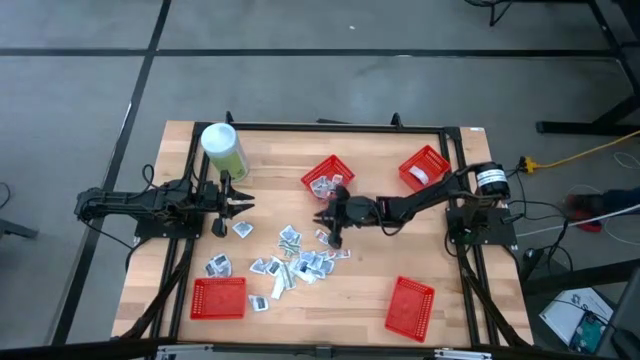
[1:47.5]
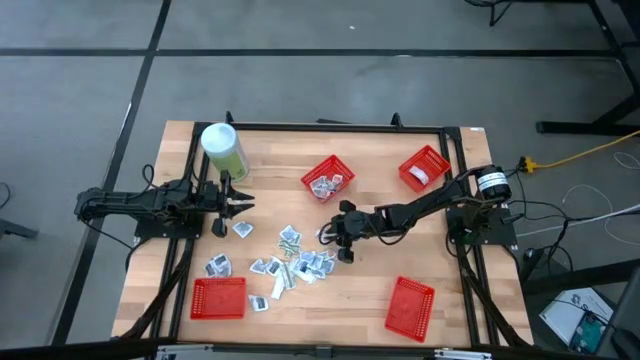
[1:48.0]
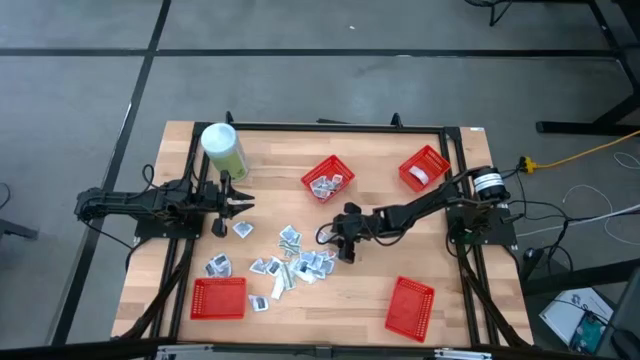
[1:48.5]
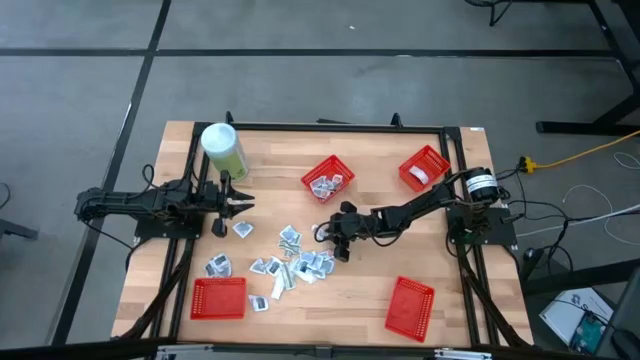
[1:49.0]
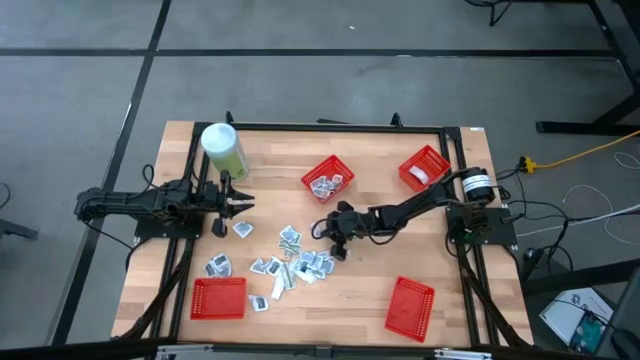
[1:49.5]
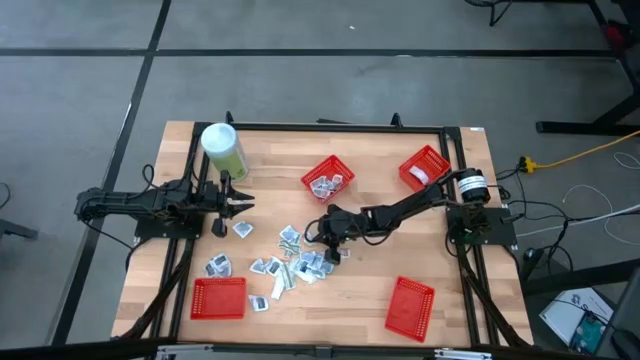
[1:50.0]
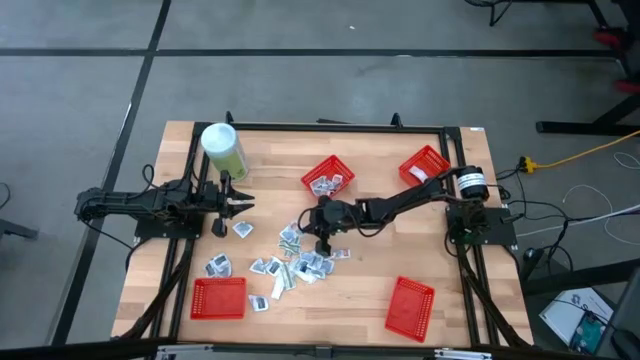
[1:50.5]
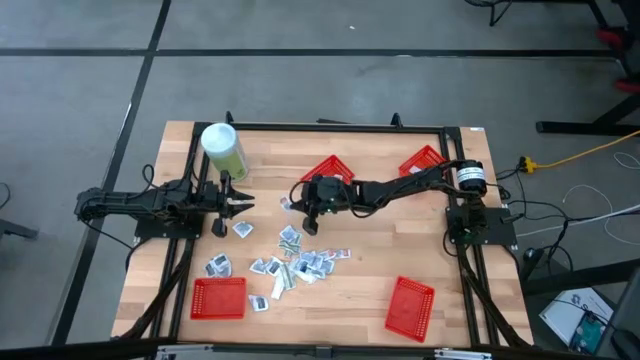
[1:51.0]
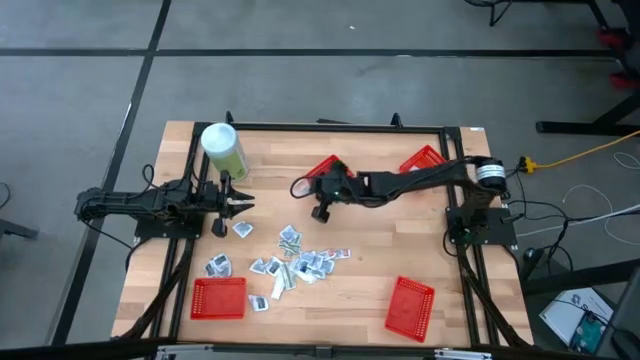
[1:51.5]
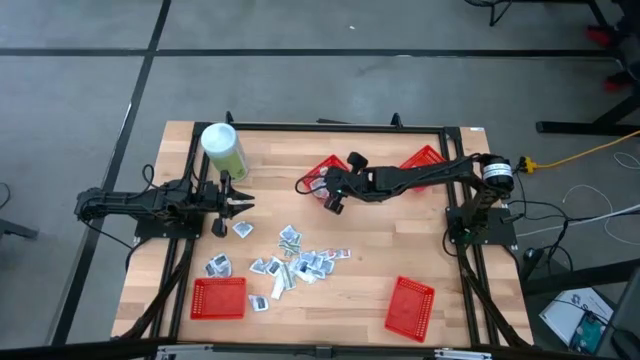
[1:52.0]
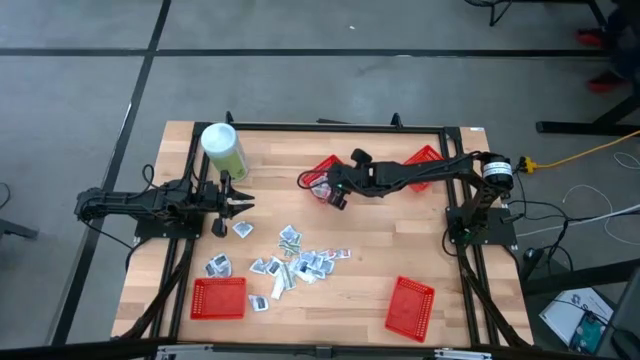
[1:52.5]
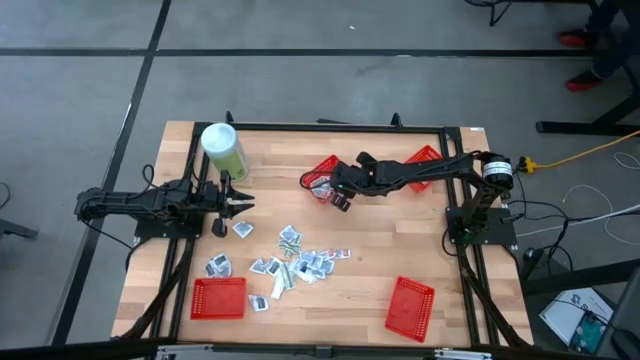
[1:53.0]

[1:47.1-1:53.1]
Task: Pick & Place First Aid Supplies
Put the orange ointment pack into the red container

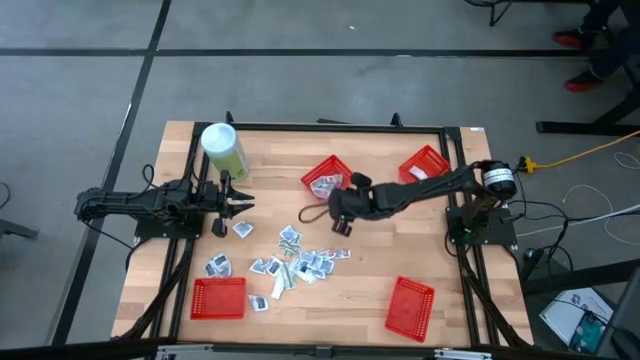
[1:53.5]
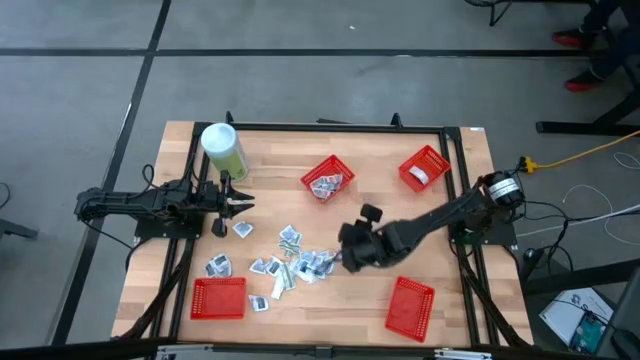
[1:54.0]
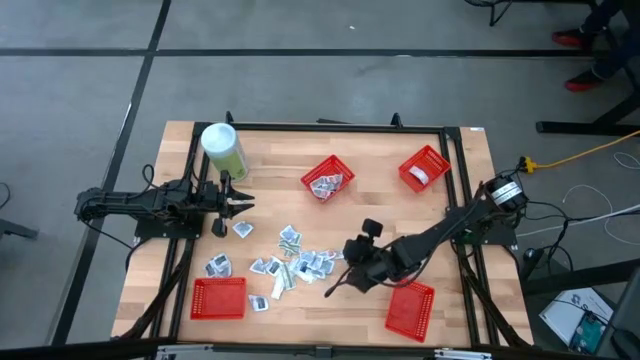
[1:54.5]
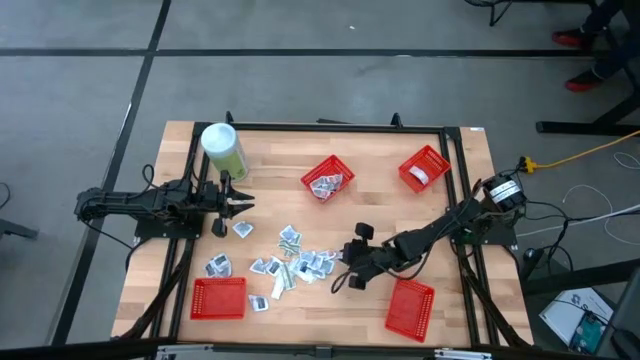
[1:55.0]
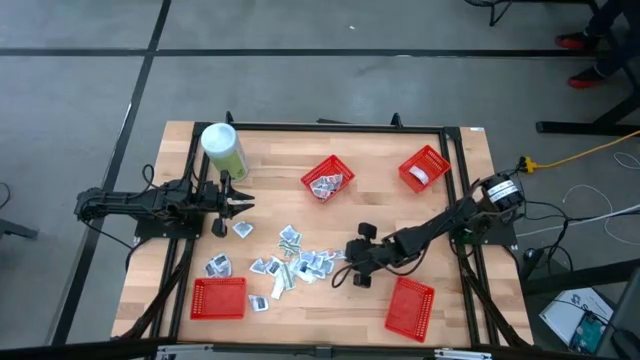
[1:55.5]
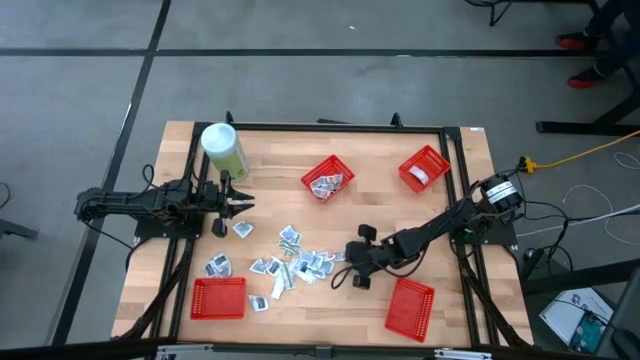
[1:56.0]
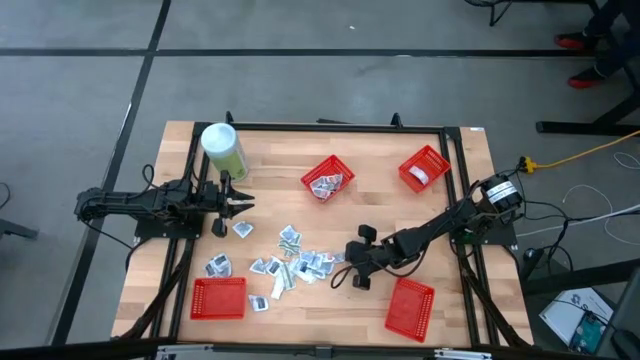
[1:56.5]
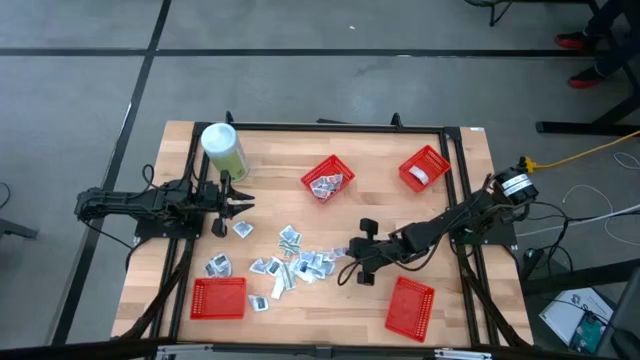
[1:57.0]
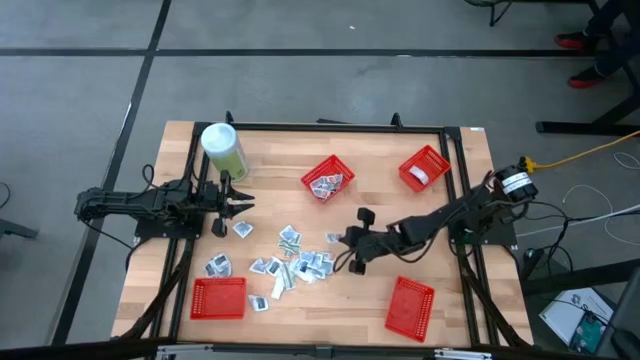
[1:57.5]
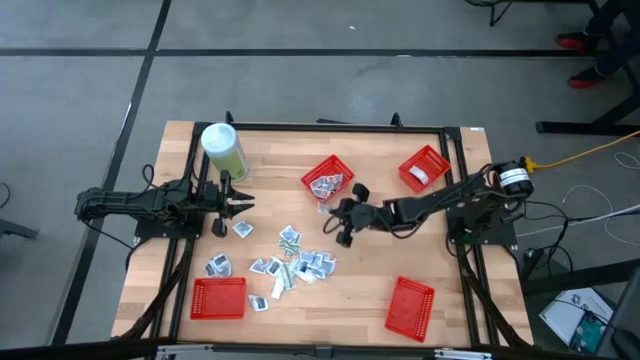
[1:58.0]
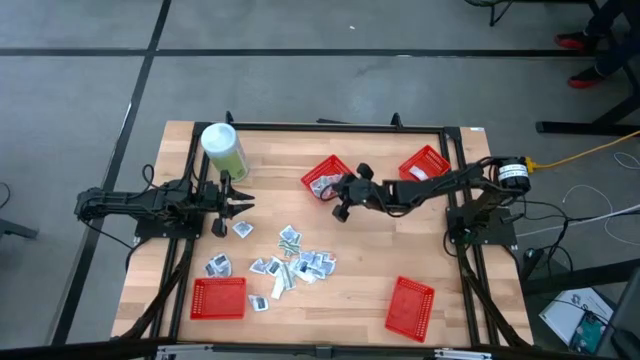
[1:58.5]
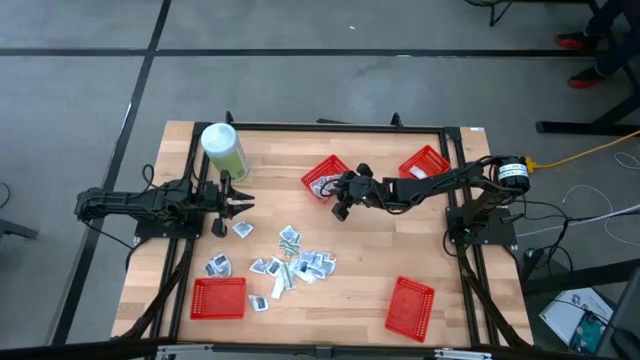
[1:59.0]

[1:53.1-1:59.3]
Put the orange ointment pack into the red container

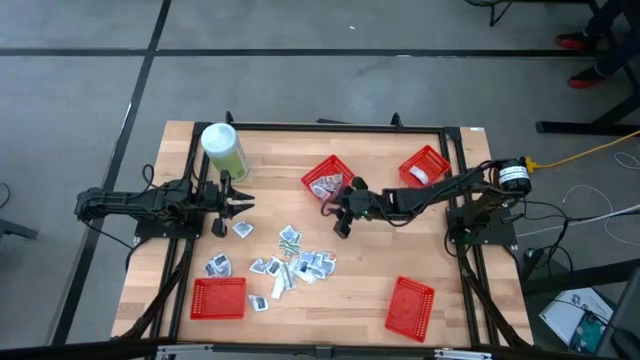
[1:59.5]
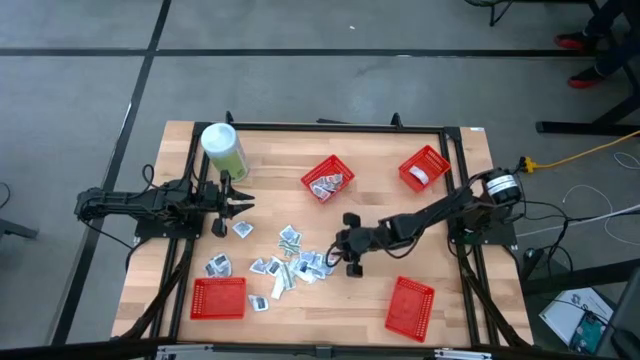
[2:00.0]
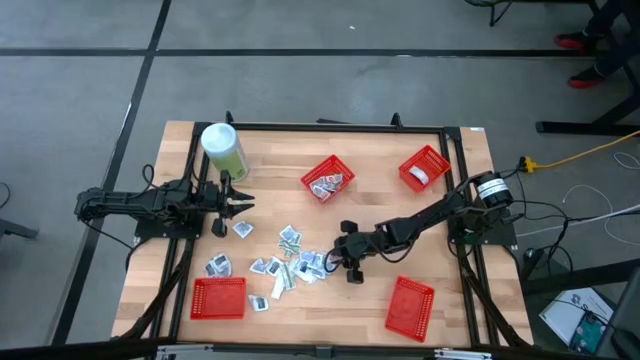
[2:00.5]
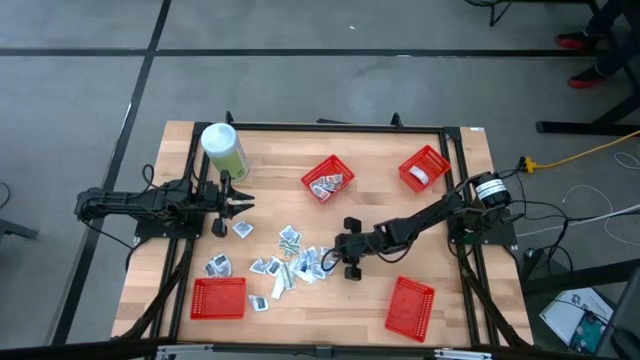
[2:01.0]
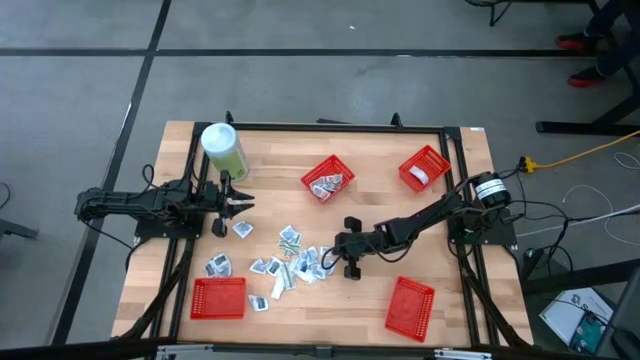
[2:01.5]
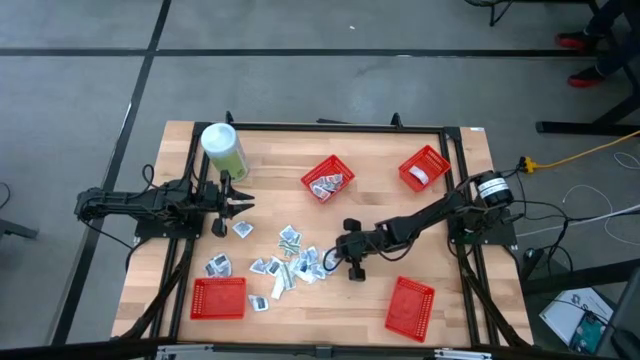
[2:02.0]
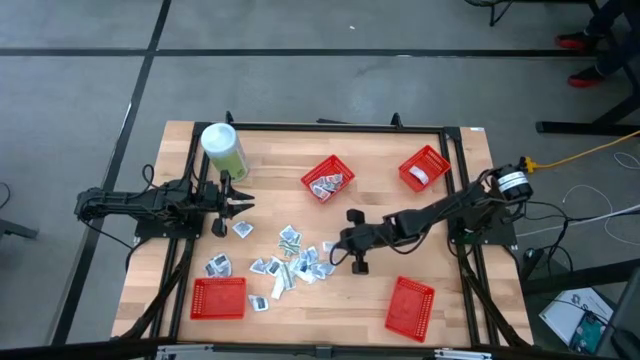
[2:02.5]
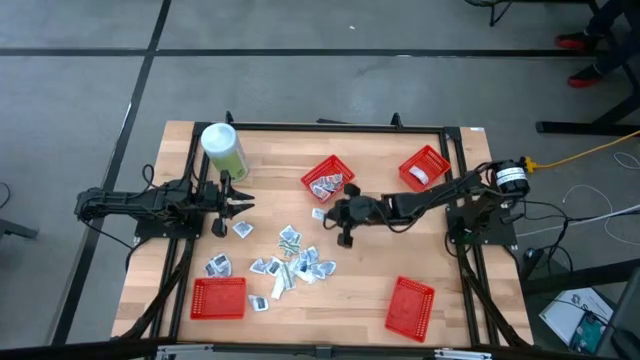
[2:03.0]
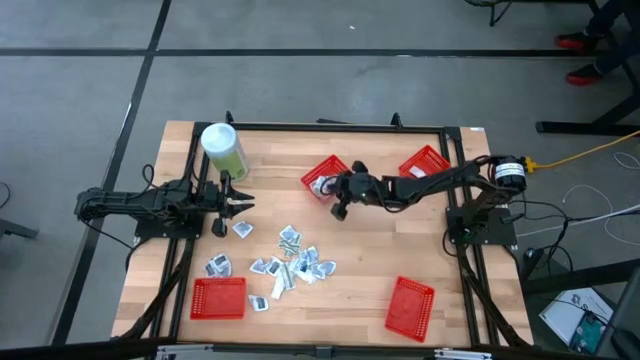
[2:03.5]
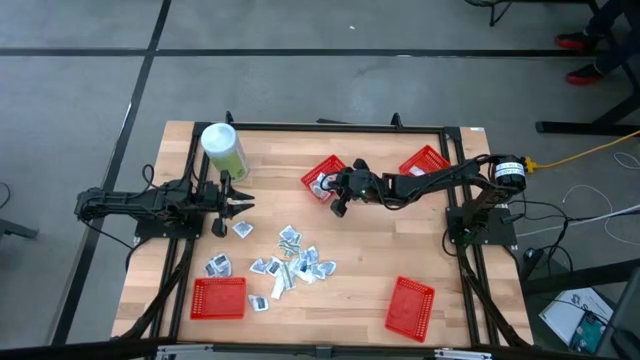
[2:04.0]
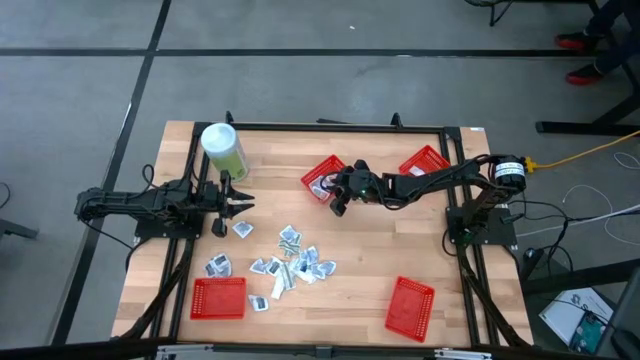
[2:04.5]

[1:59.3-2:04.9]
Put the orange ointment pack into the red container

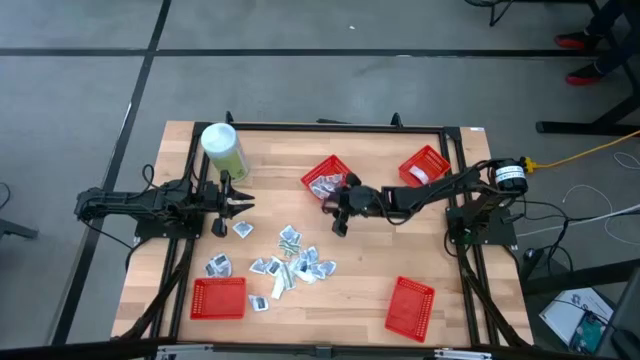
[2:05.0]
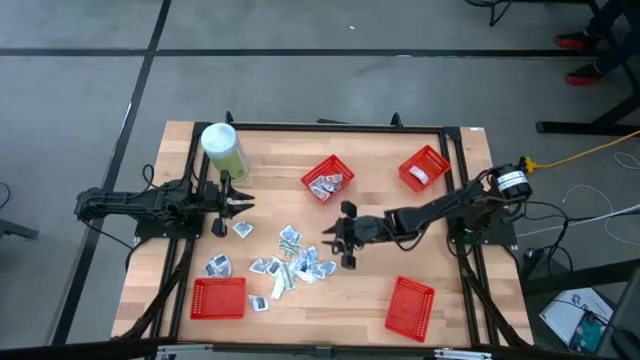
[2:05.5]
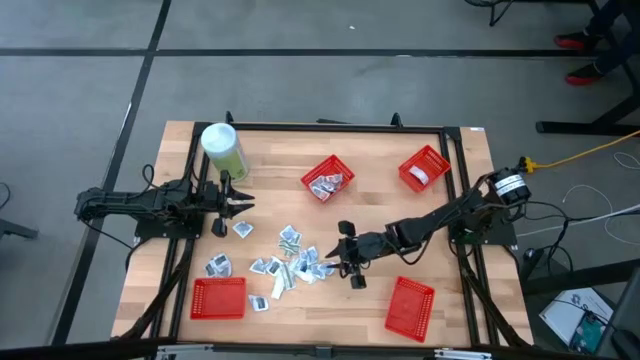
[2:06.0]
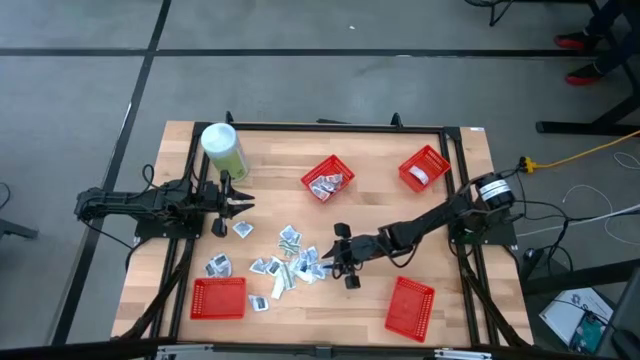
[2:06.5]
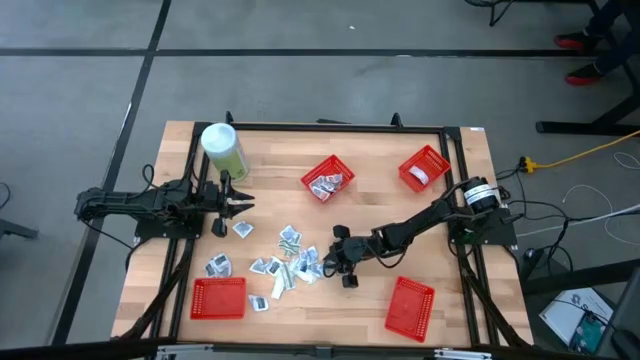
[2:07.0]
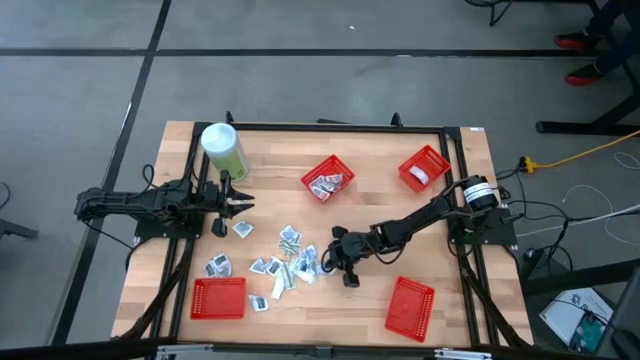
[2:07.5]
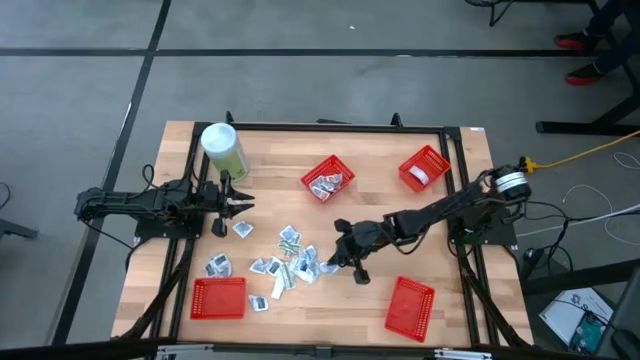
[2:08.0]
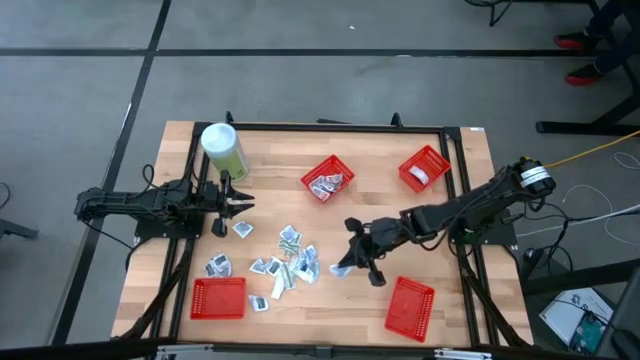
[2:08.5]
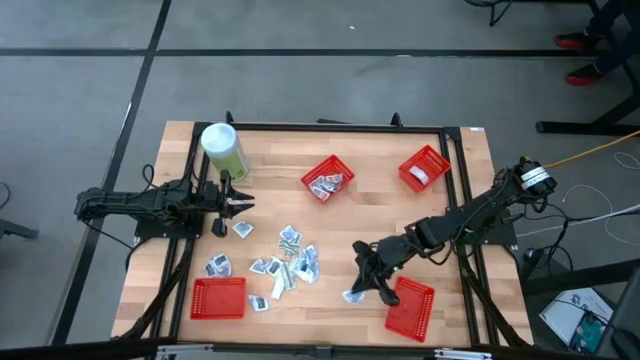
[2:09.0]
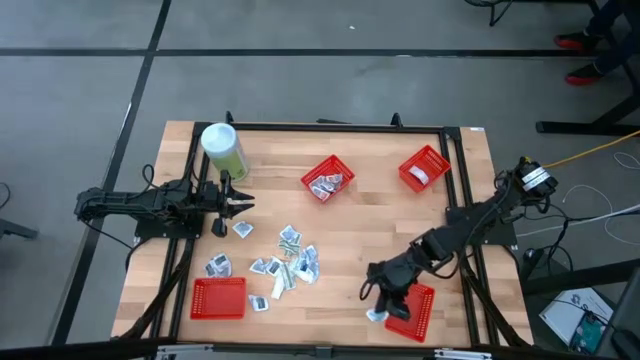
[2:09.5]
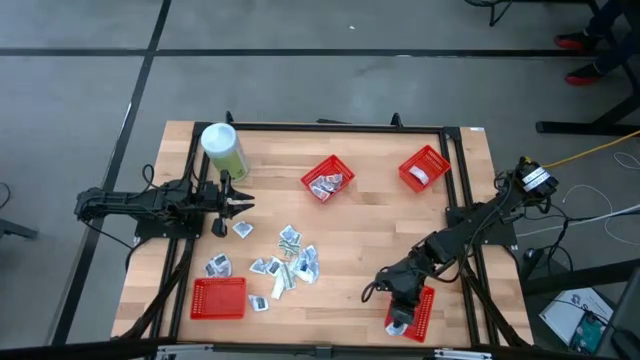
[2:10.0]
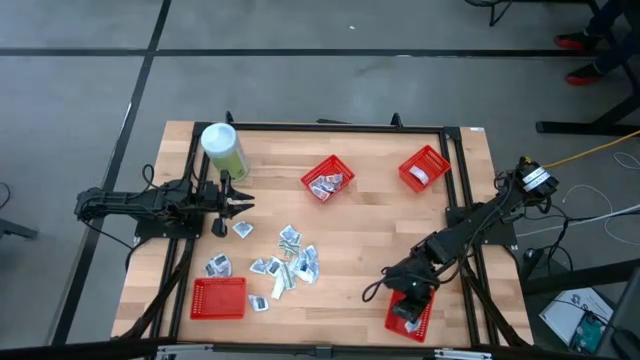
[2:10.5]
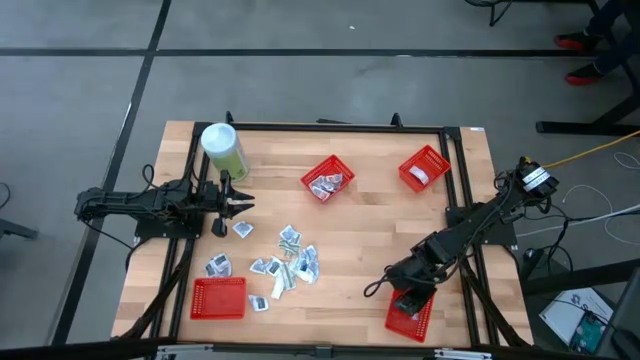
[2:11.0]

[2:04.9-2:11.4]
Put the blue alcohol pad into the red container
